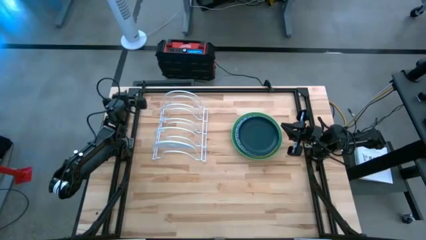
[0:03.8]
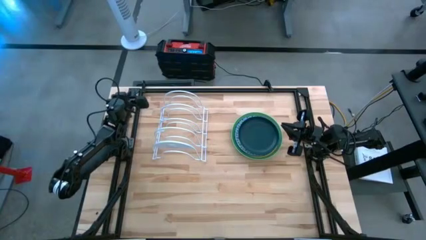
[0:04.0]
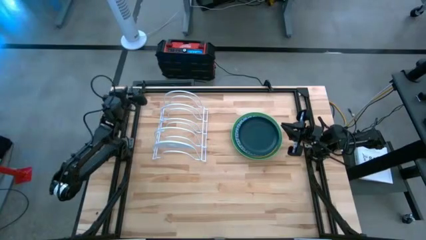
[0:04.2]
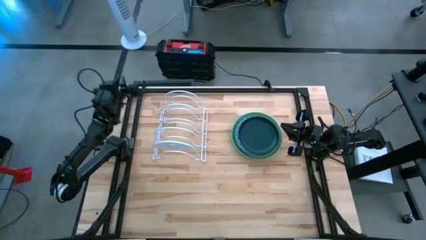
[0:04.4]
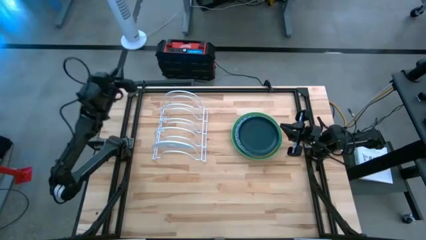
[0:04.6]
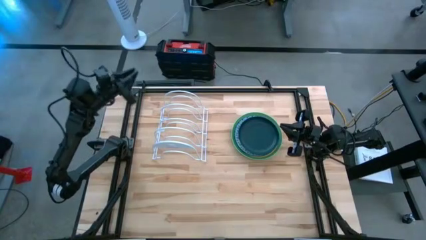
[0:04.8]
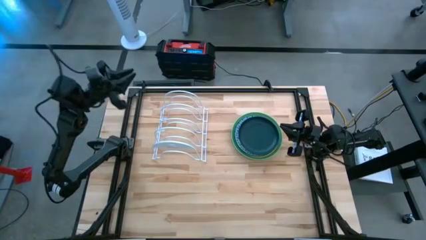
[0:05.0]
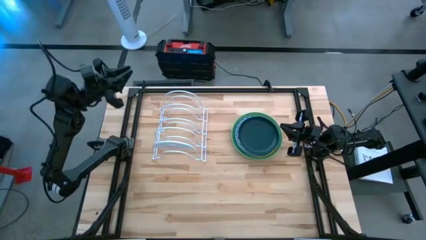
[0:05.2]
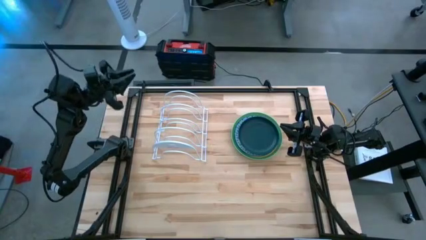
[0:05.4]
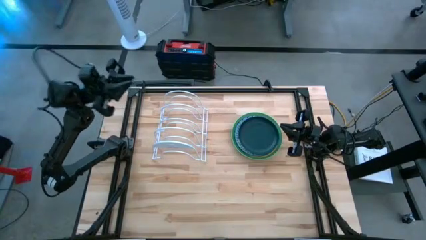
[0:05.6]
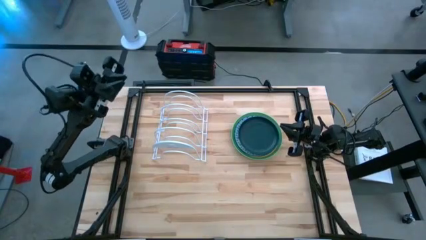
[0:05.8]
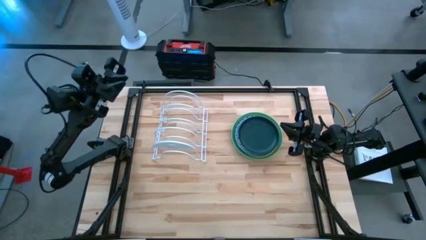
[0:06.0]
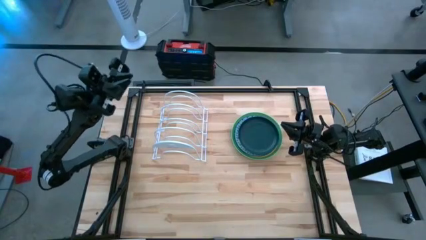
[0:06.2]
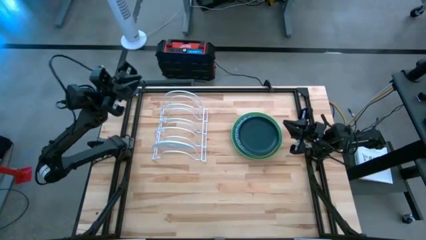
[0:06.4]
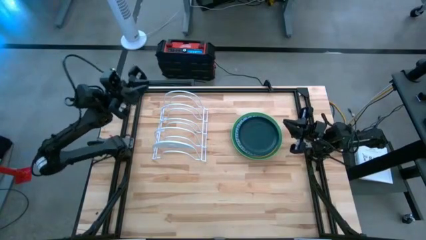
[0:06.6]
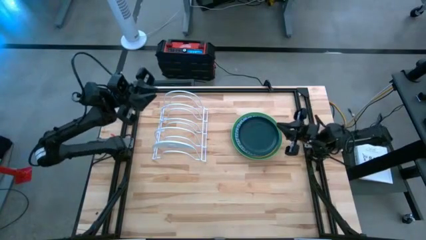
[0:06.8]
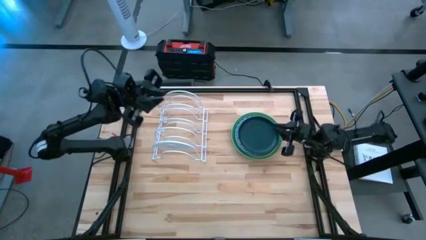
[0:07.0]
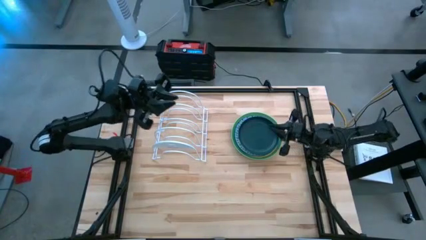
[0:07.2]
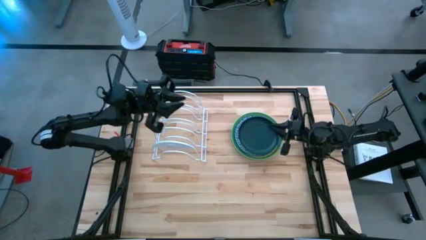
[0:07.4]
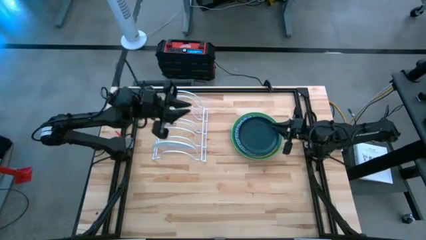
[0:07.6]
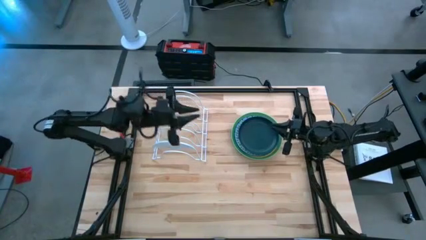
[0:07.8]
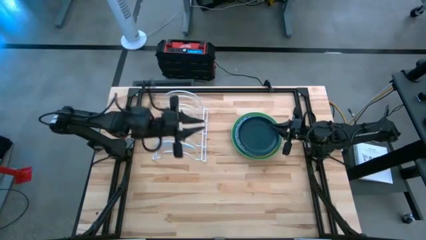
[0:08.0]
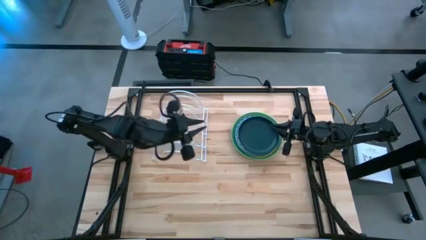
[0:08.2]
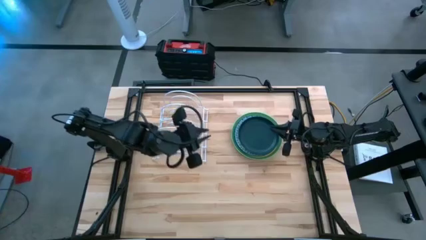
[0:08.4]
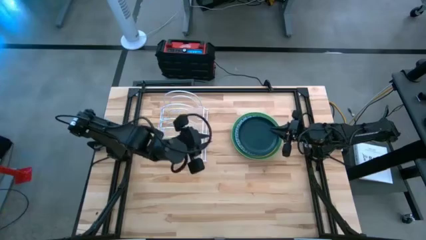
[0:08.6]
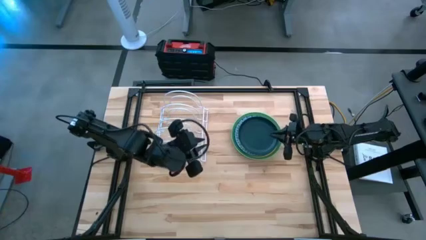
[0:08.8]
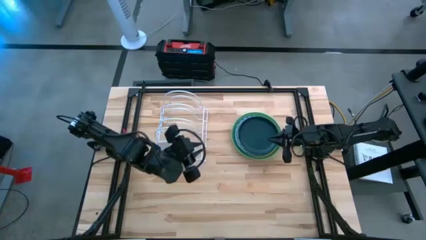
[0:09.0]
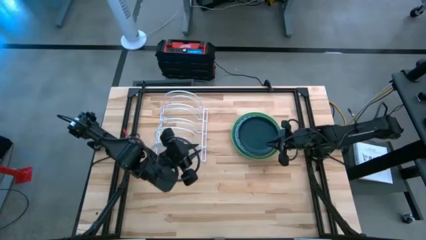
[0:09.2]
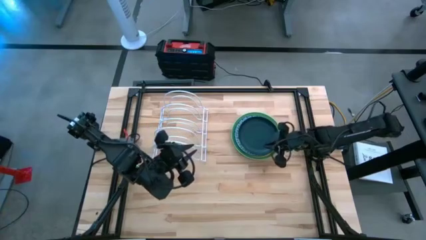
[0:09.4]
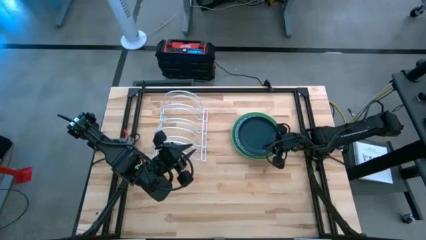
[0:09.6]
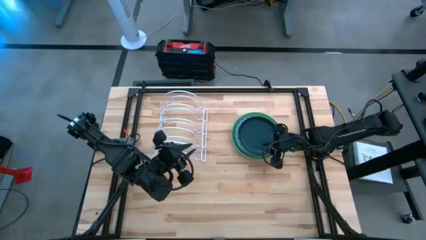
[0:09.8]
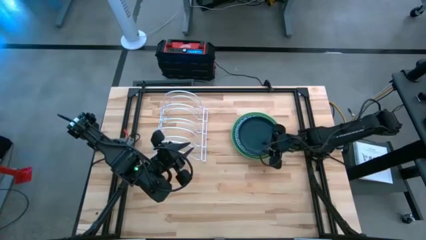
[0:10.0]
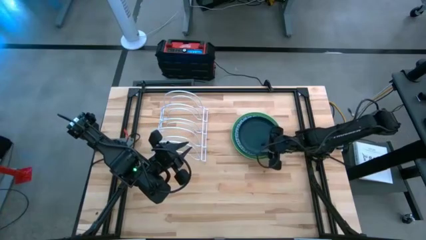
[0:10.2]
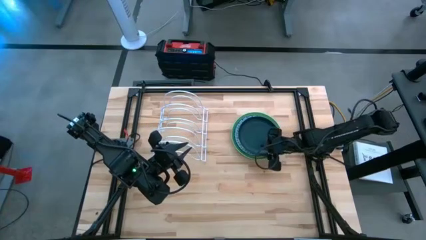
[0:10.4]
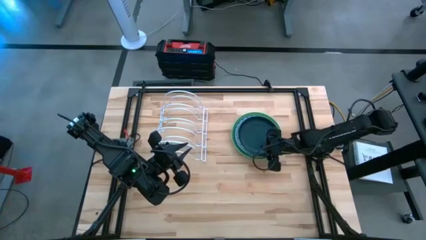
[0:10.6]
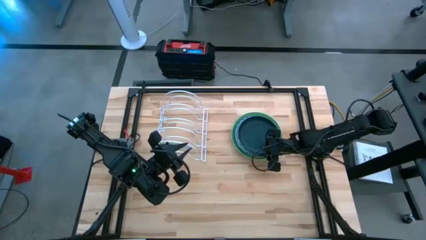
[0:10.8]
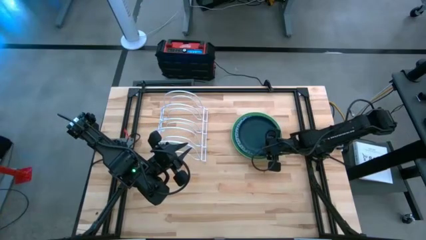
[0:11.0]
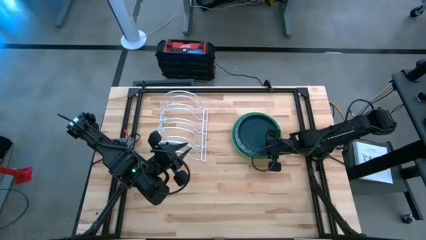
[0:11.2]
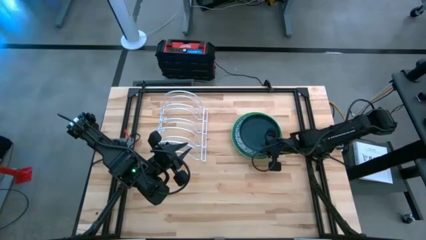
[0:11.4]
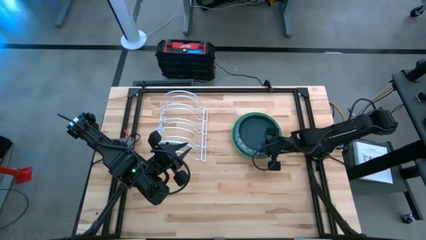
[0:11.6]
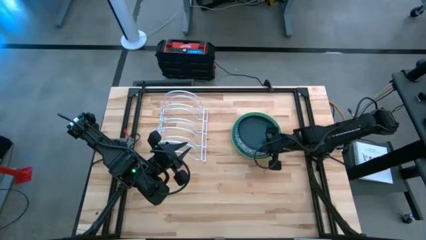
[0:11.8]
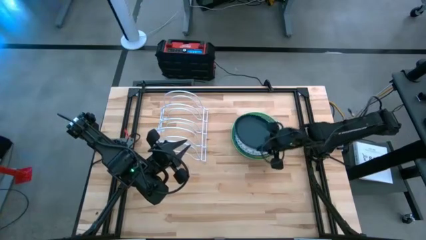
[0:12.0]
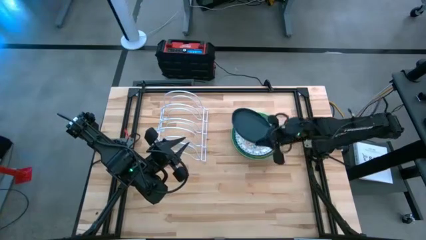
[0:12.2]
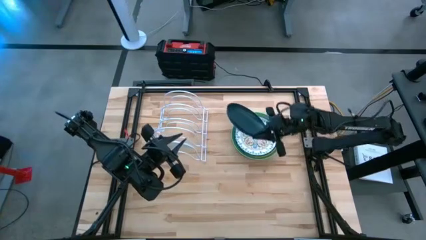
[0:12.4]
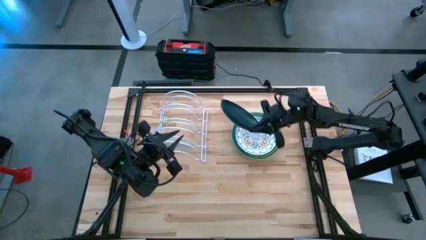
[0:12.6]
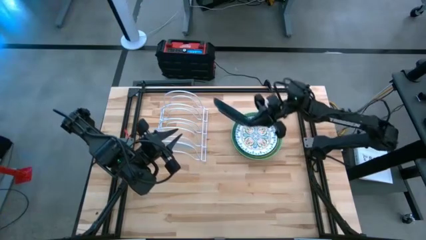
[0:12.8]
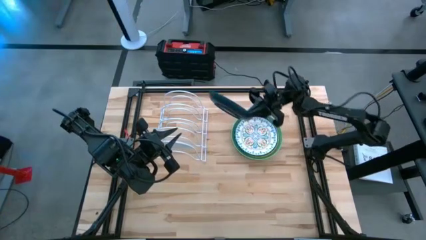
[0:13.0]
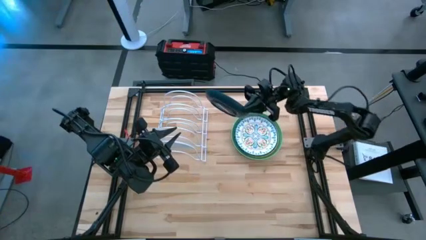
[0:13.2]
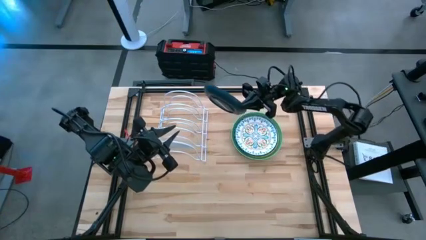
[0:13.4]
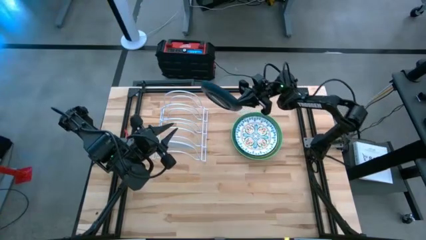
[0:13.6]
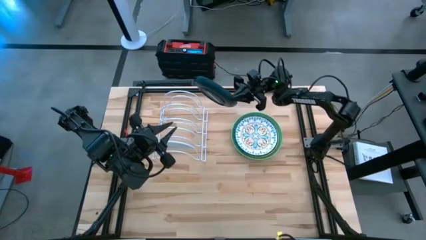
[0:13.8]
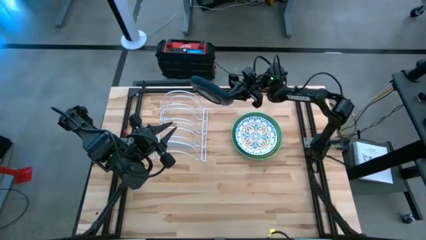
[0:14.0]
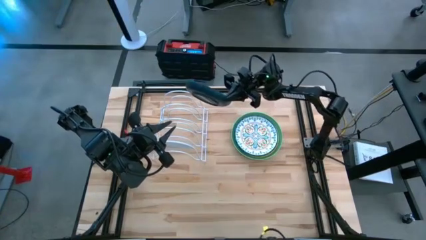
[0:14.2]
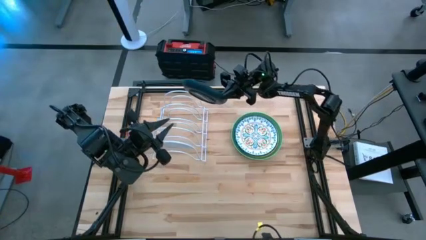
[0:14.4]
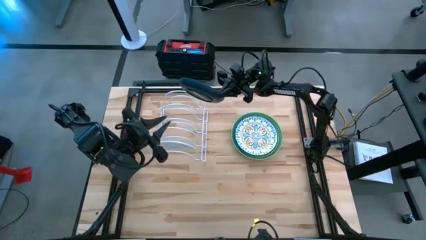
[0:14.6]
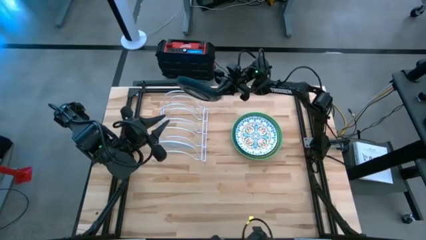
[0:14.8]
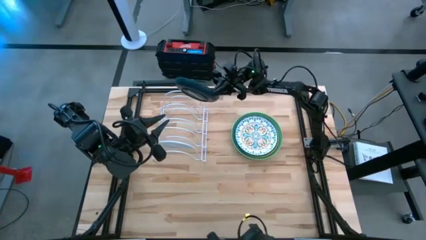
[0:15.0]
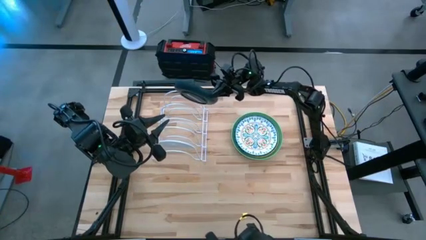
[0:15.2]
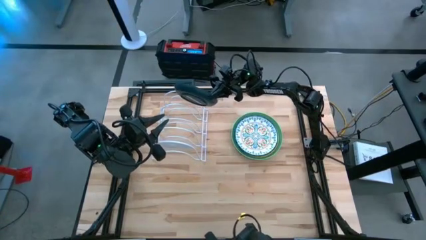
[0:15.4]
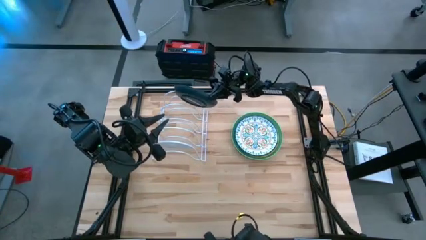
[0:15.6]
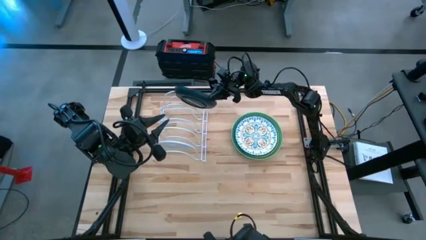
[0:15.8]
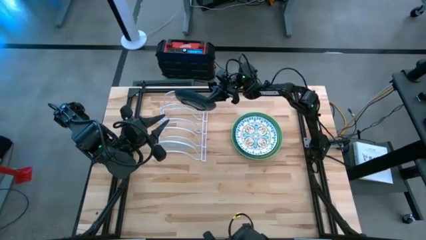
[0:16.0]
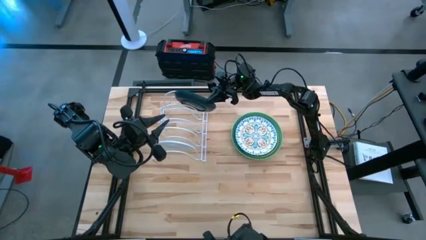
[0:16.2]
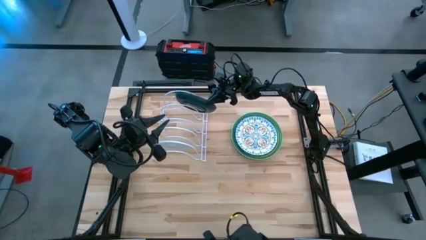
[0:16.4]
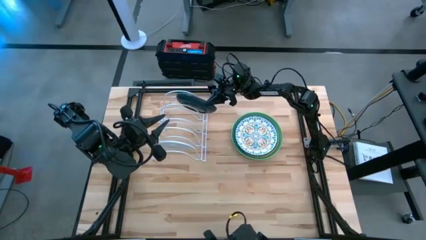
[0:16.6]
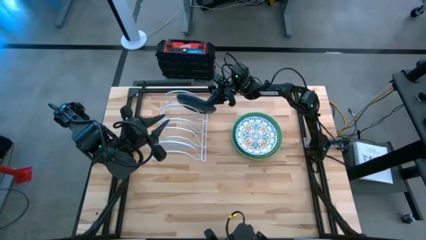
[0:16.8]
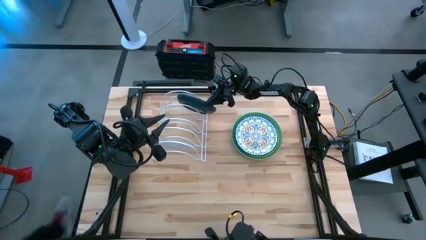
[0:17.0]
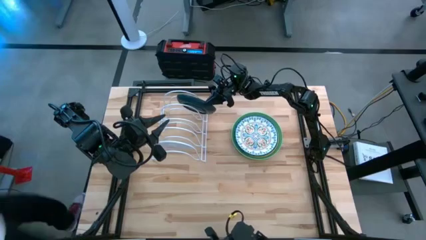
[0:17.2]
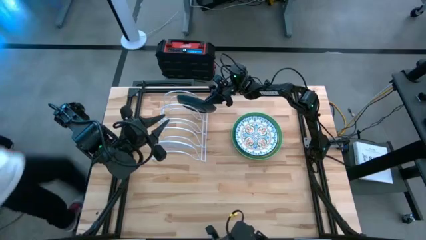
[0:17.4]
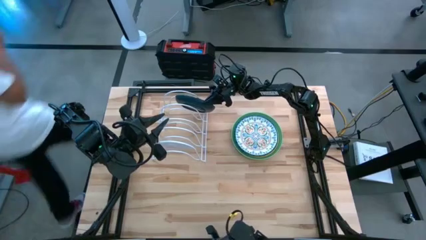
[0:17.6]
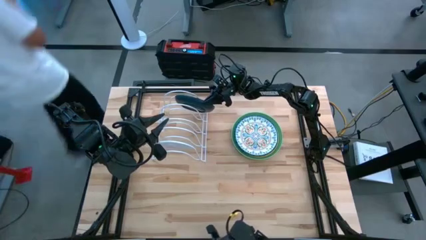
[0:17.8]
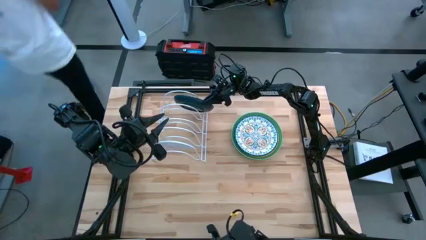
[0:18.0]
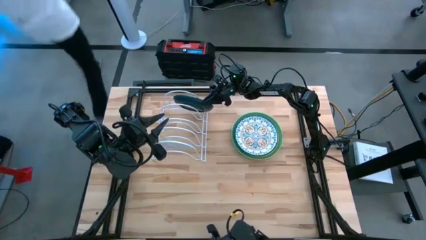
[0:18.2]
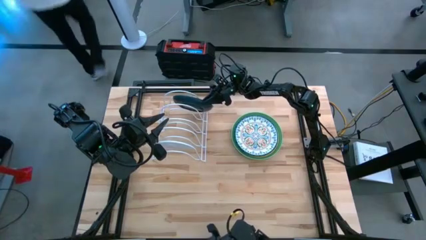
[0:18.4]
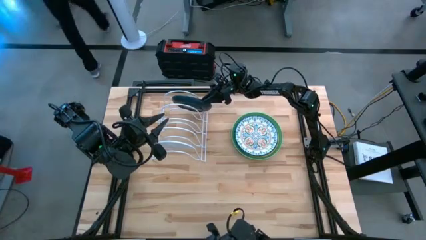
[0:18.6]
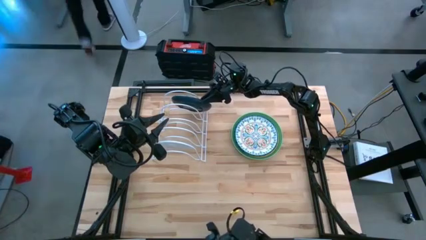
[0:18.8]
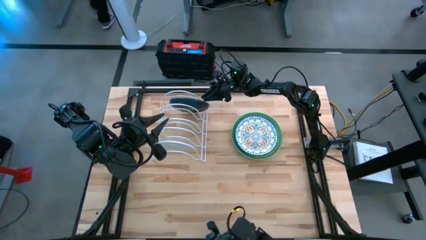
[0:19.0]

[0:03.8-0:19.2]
Task: Sort dishes
Put the dark blue plate in the dish rack
